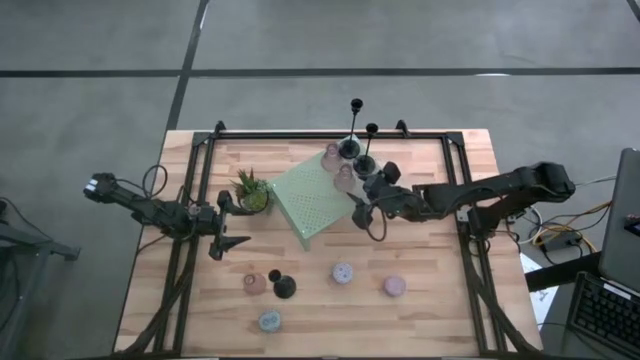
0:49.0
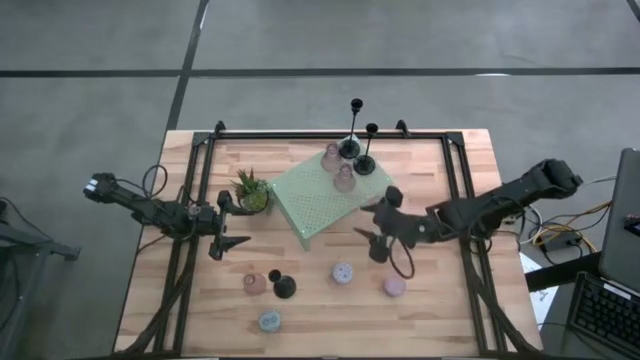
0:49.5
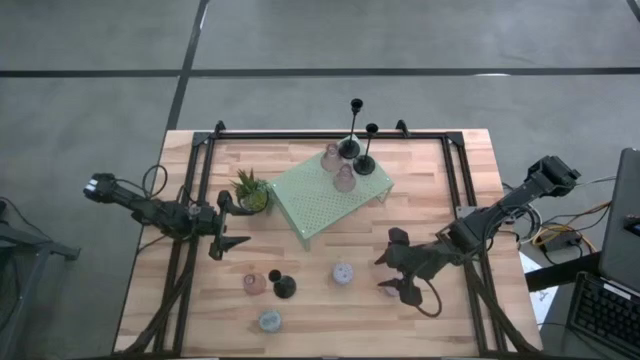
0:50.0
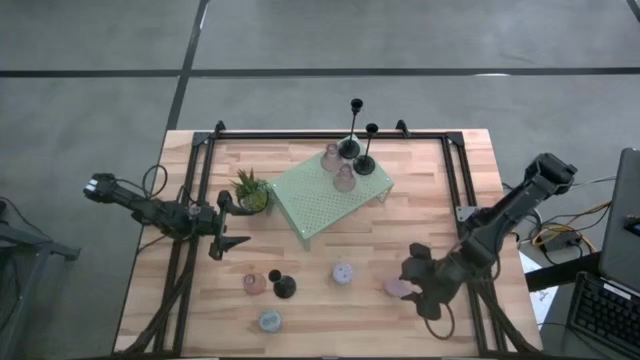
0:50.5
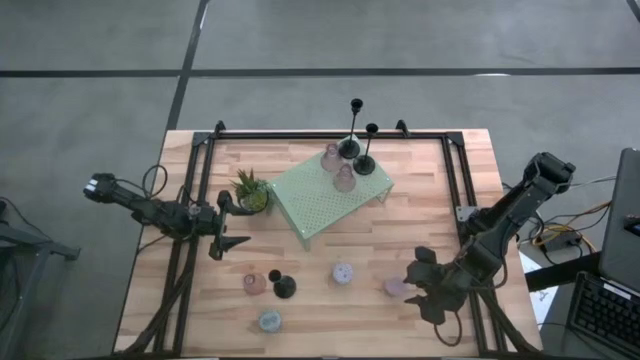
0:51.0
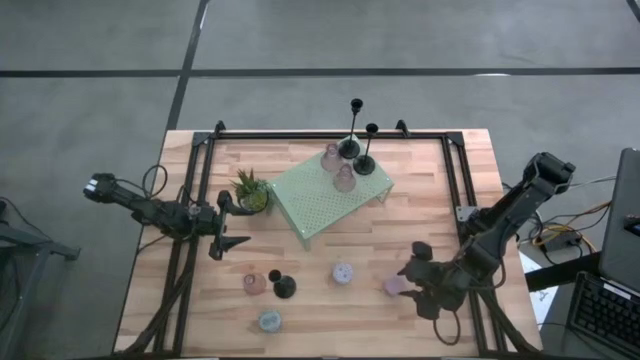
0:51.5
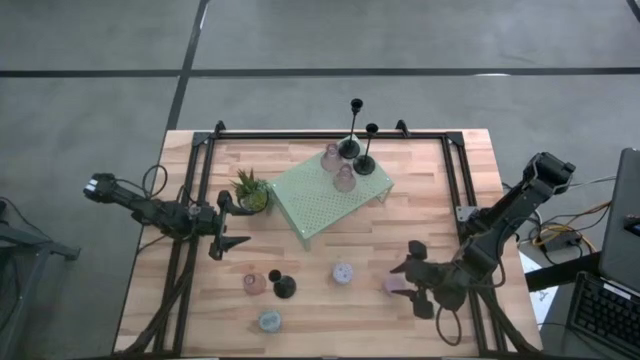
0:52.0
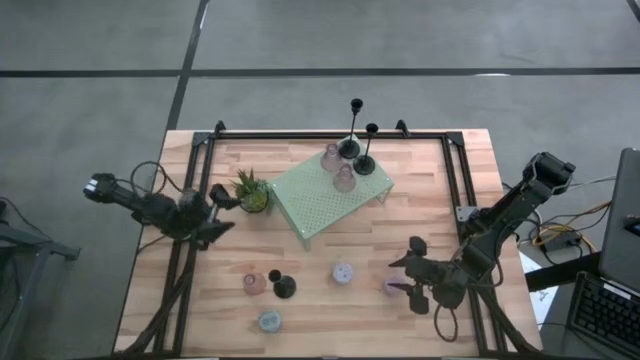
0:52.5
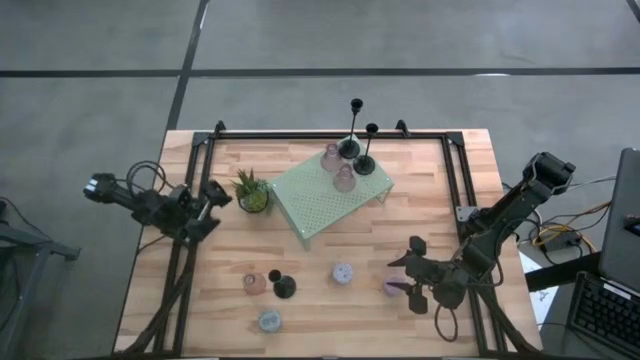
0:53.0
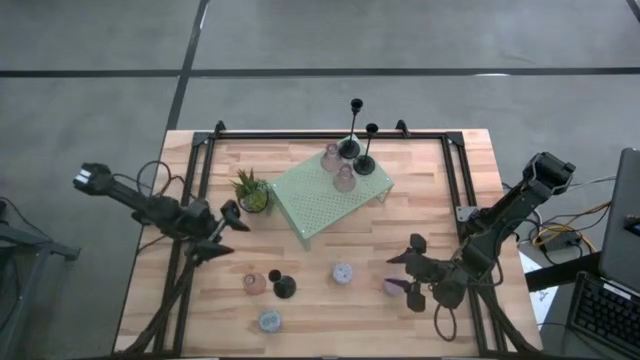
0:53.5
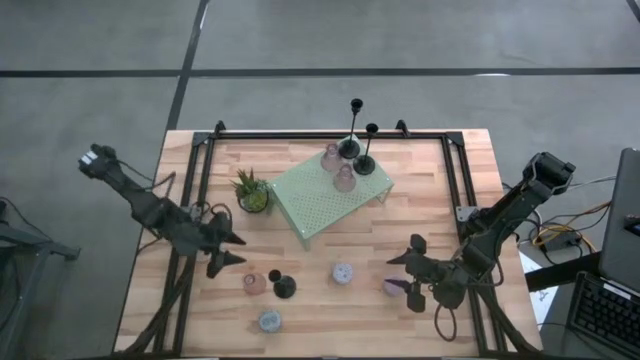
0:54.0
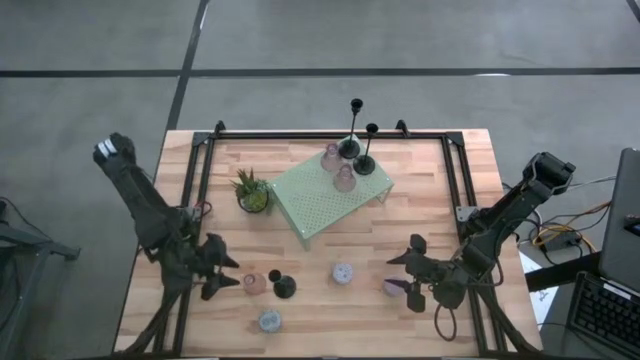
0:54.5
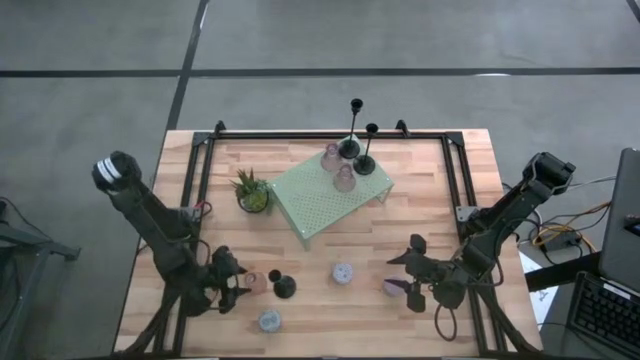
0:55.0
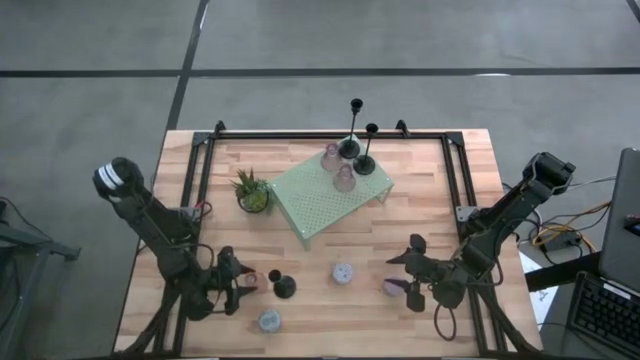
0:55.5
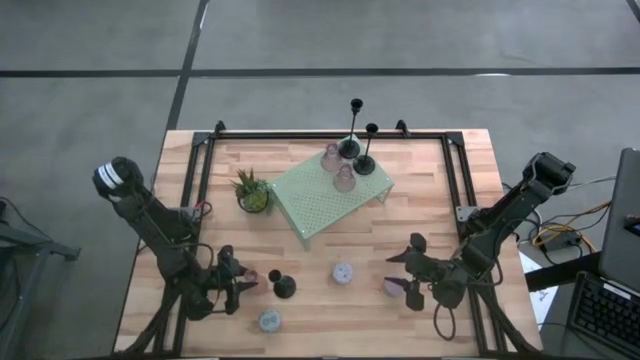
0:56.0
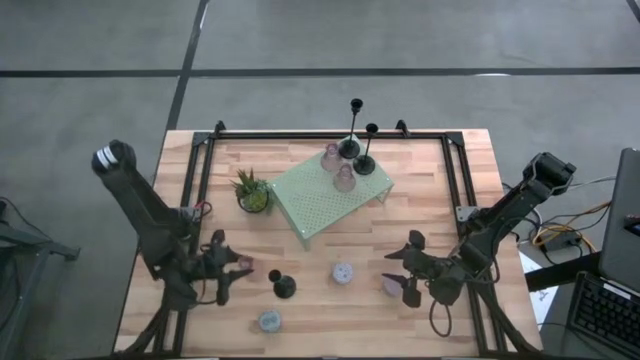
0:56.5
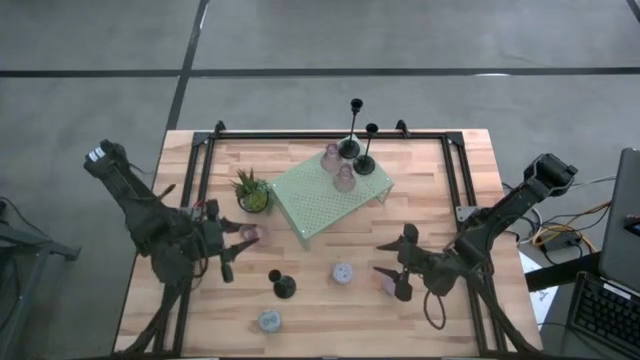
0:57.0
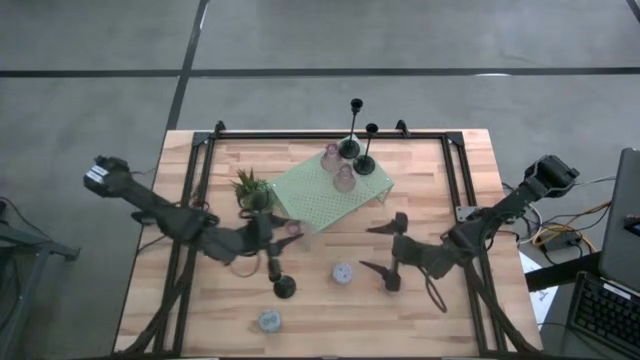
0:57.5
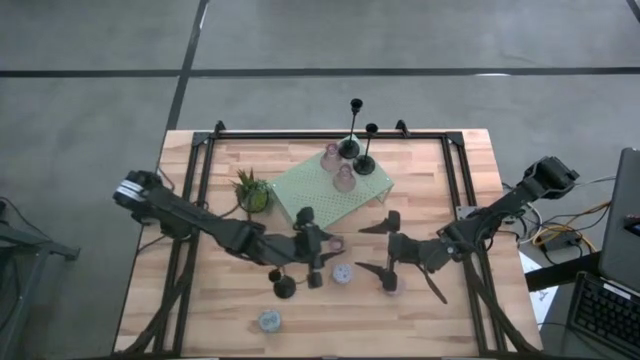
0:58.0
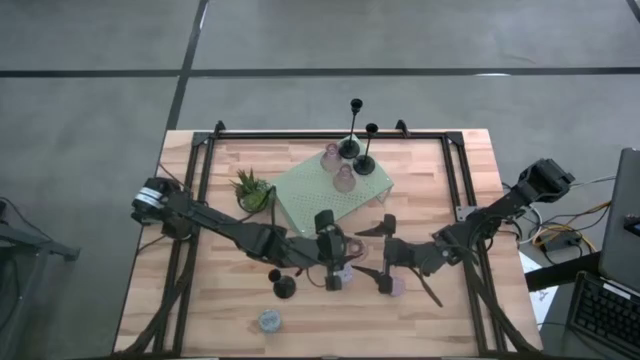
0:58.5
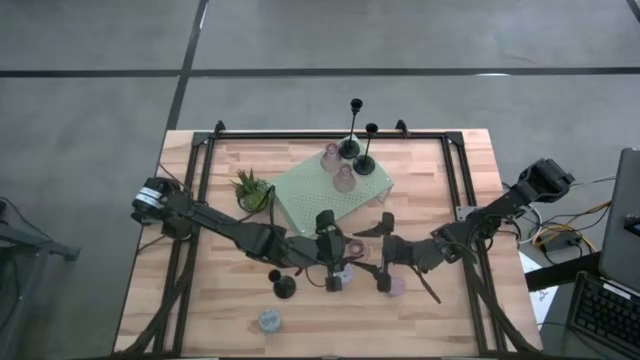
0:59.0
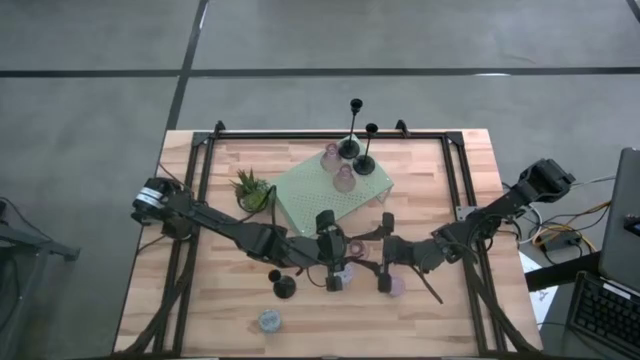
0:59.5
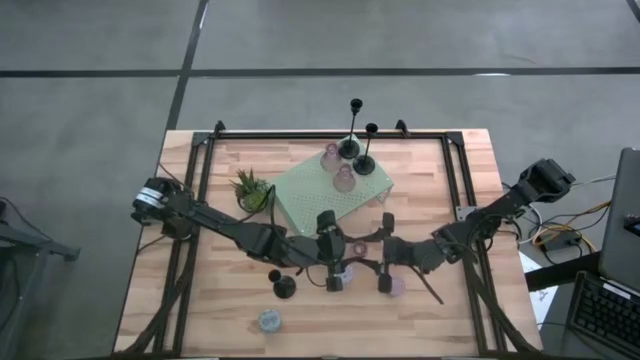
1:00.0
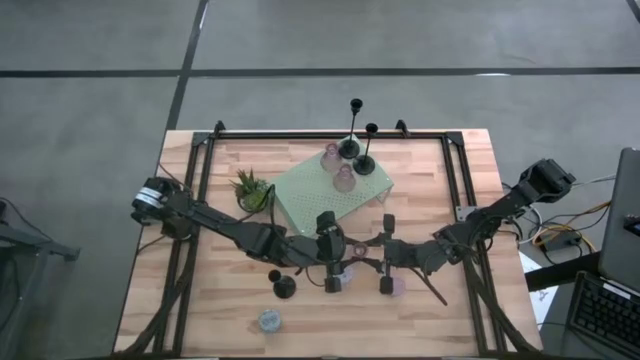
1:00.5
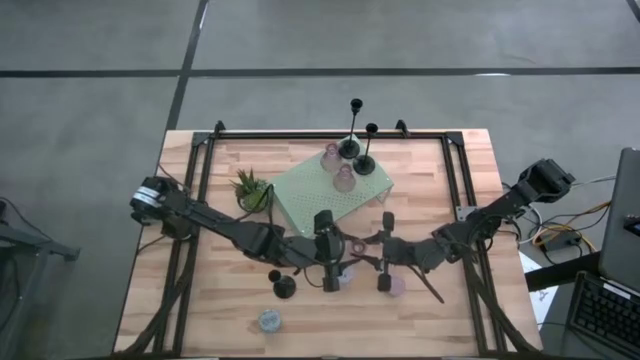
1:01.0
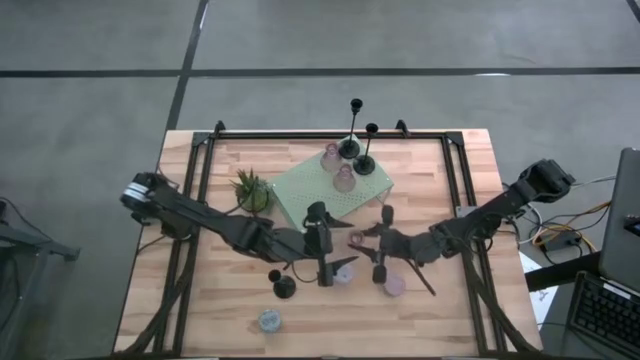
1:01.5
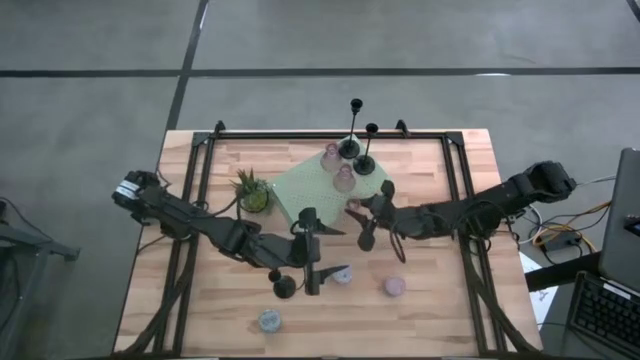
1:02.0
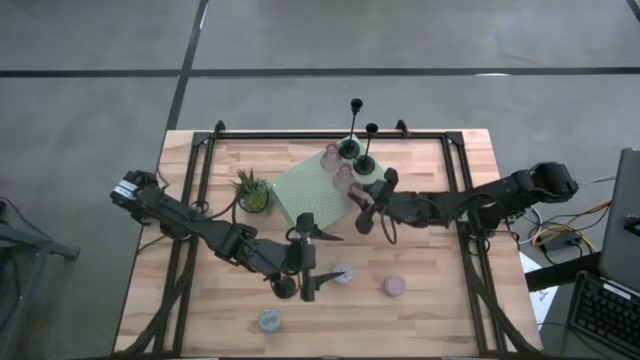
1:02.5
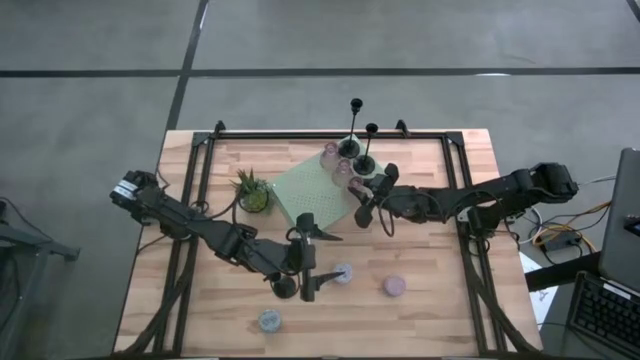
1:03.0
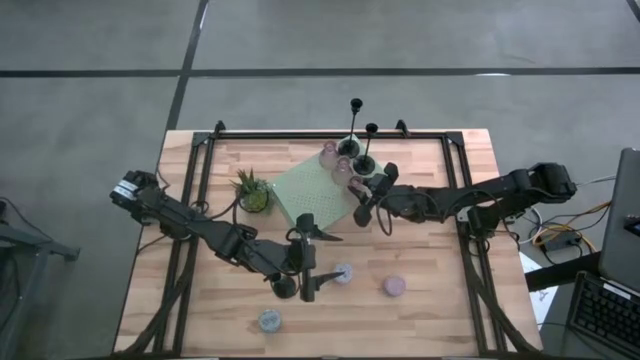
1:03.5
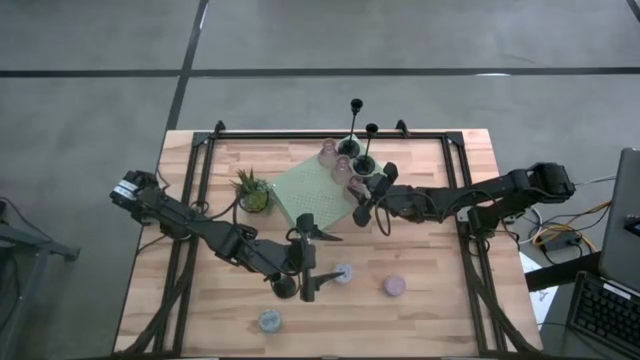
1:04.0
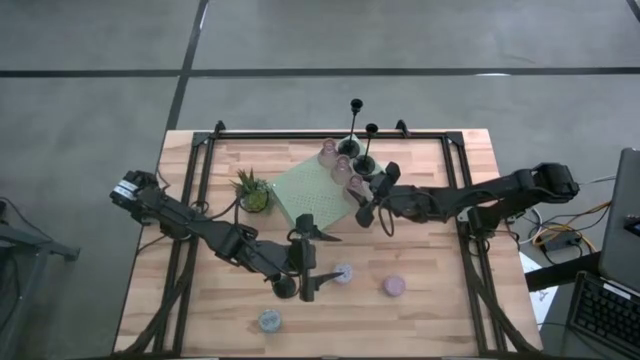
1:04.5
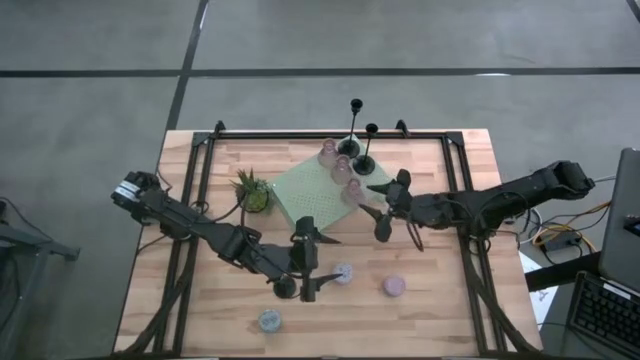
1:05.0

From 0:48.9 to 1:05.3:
Task: Pick & Place candle stick holders
Put the pink glass candle holder on the shelf aligned with the other pink glass candle holder

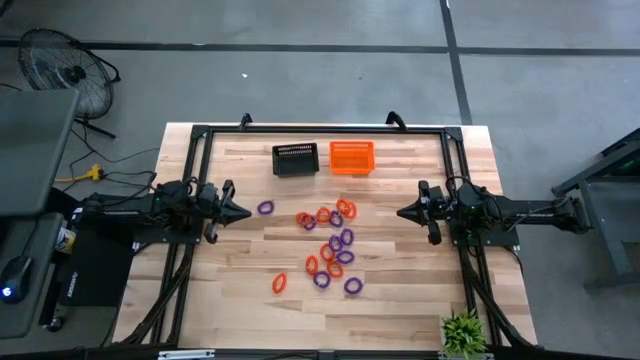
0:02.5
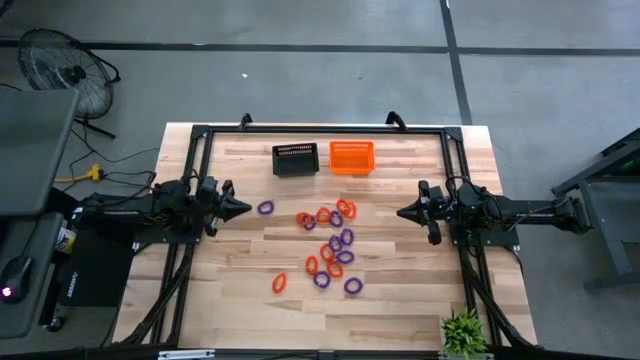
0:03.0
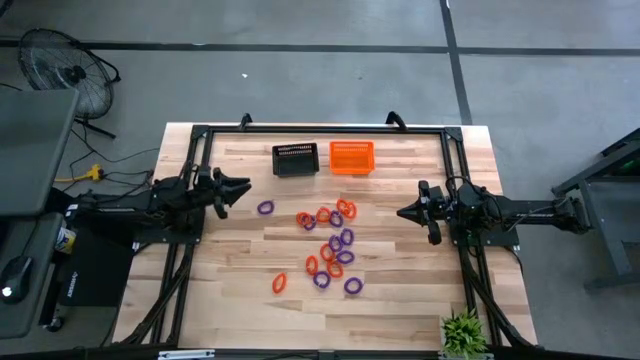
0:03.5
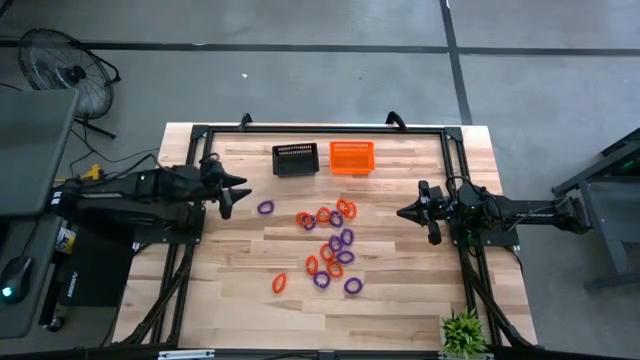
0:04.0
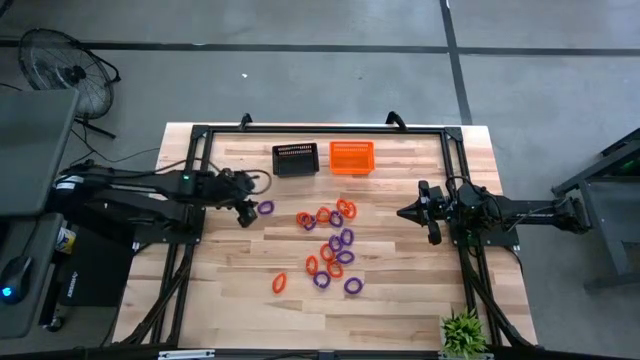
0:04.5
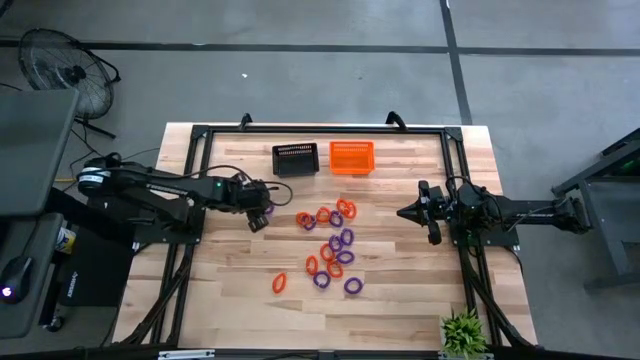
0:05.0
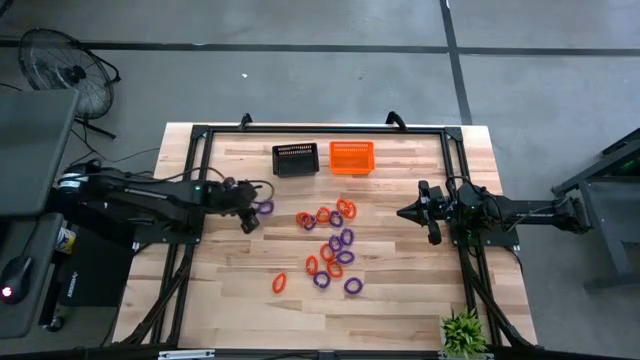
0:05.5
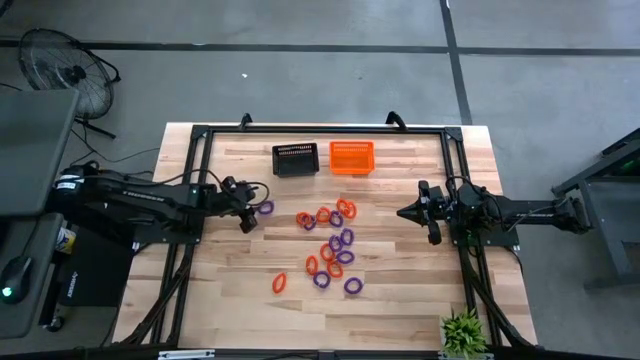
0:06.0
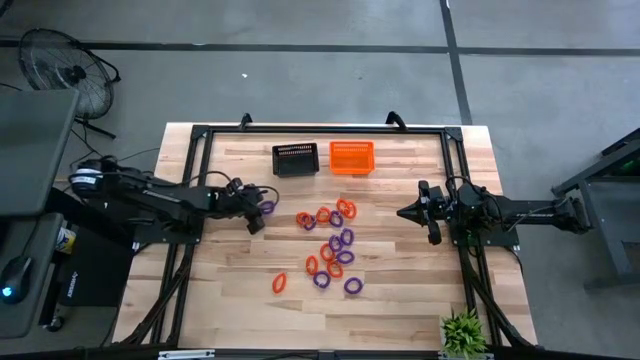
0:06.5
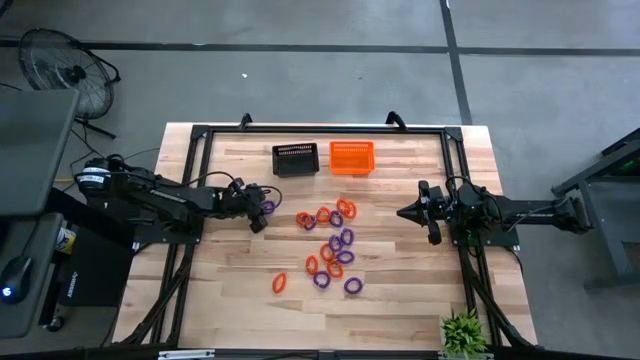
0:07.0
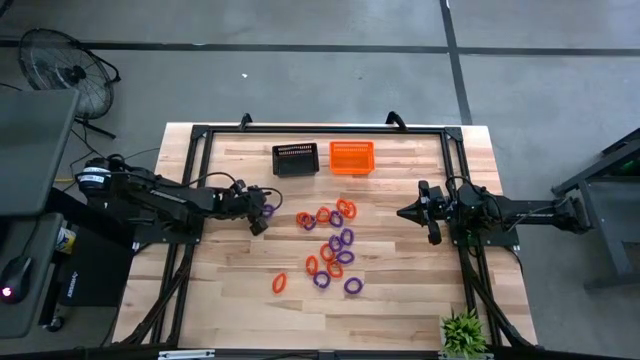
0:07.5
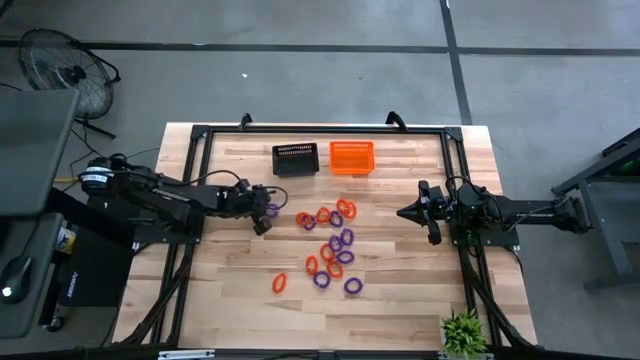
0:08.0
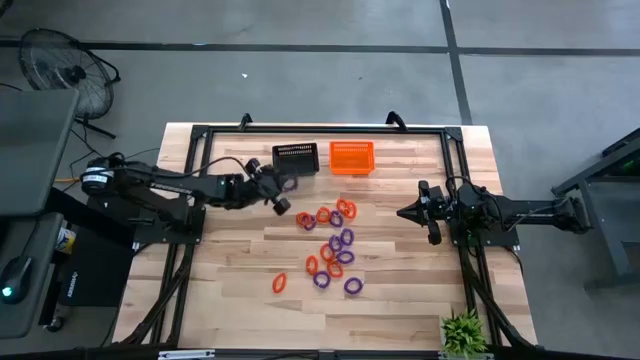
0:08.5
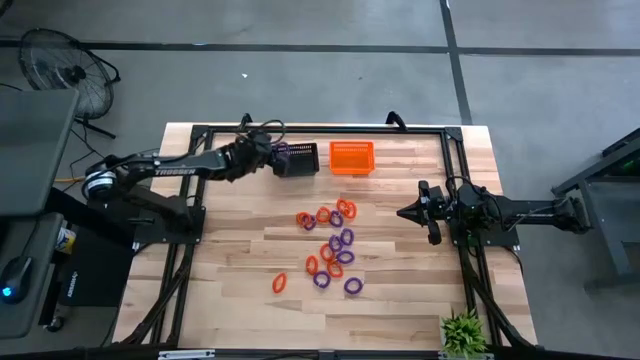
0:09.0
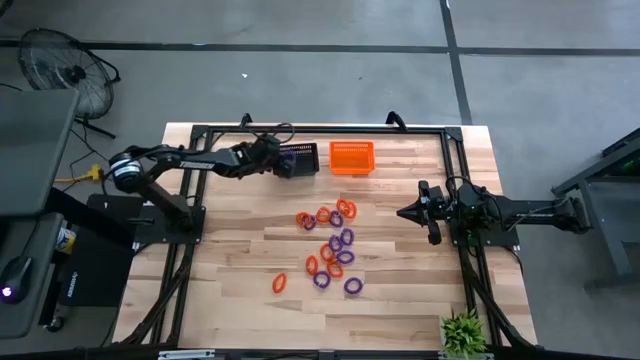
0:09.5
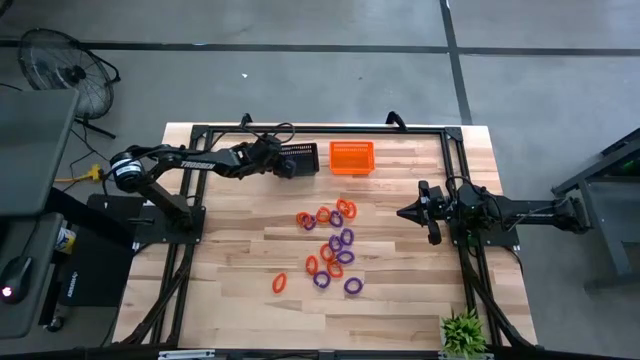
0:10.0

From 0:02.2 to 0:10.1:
Task: Sort spring keychains
Put the purple spring keychain into the black bin
